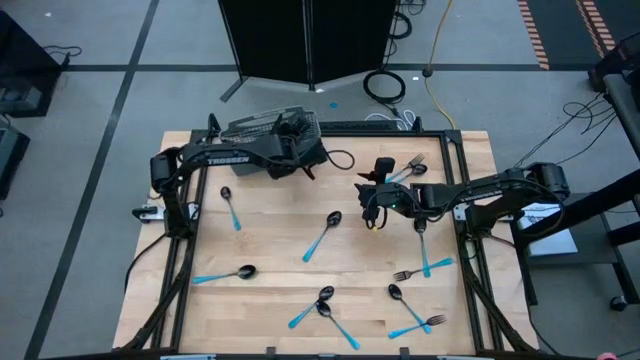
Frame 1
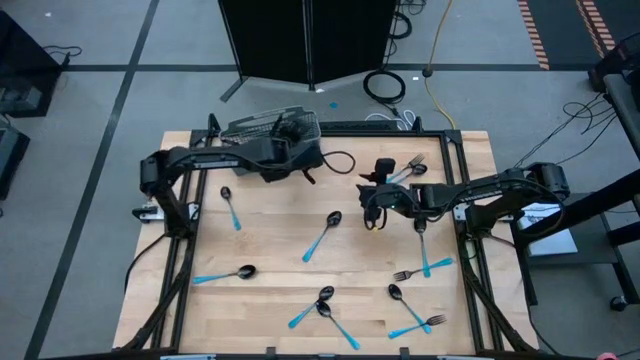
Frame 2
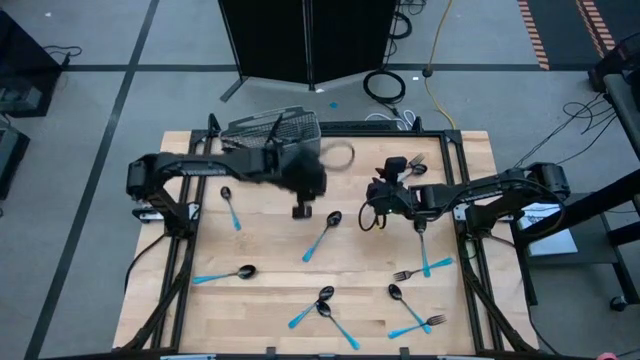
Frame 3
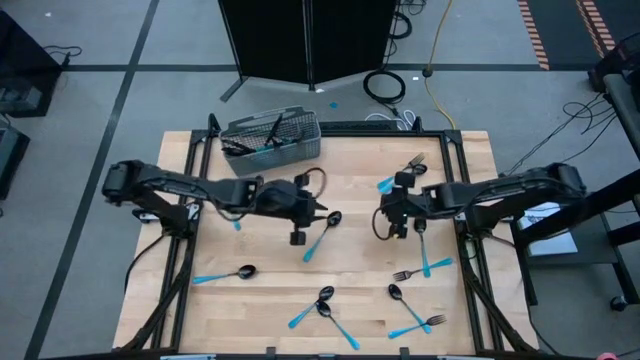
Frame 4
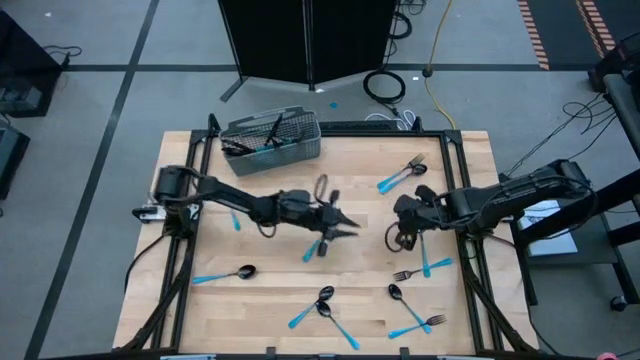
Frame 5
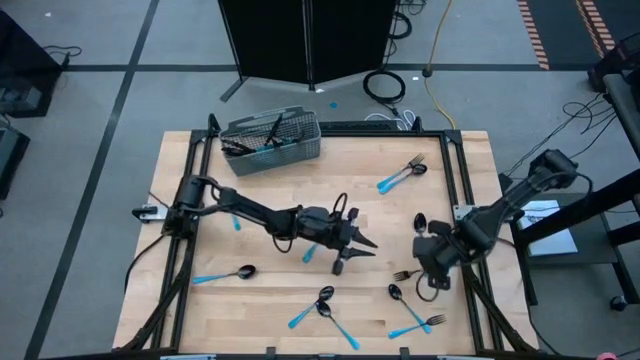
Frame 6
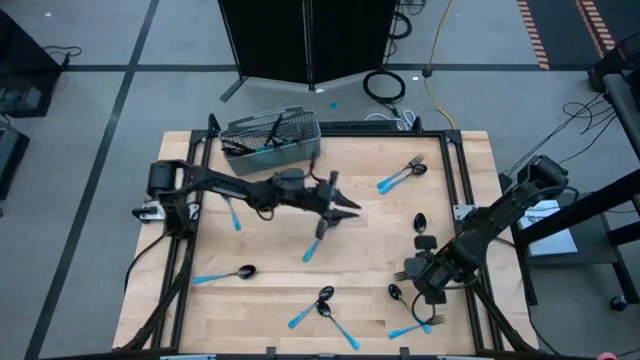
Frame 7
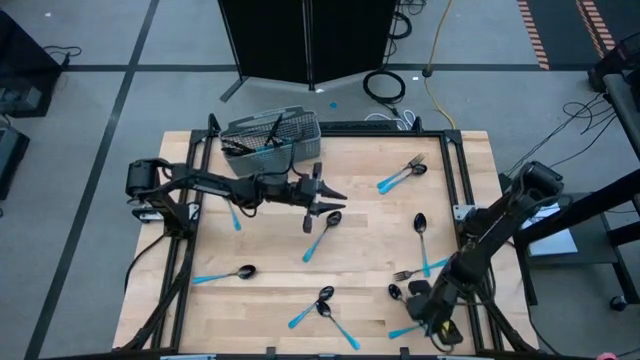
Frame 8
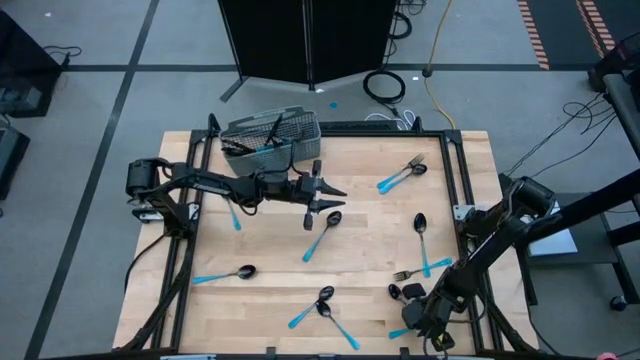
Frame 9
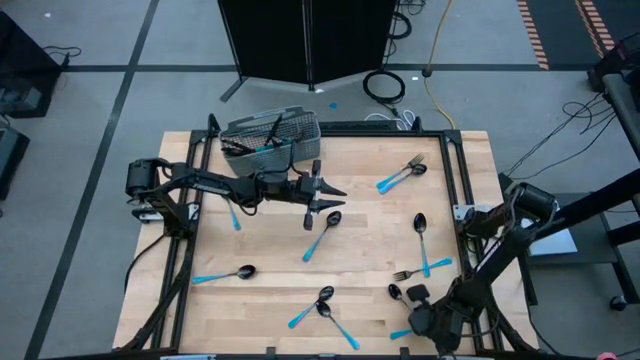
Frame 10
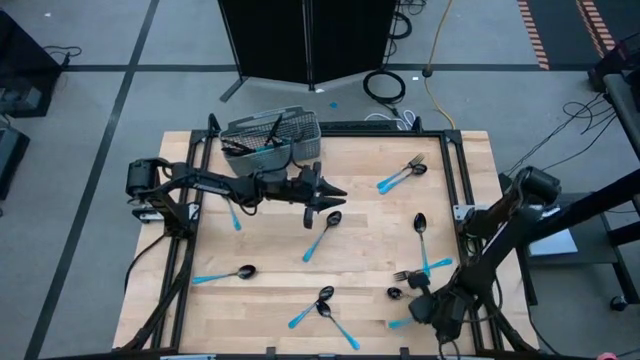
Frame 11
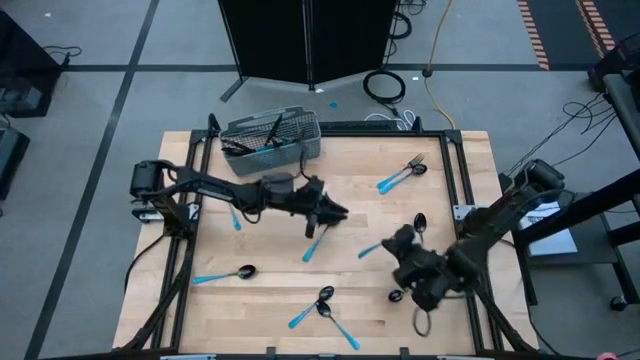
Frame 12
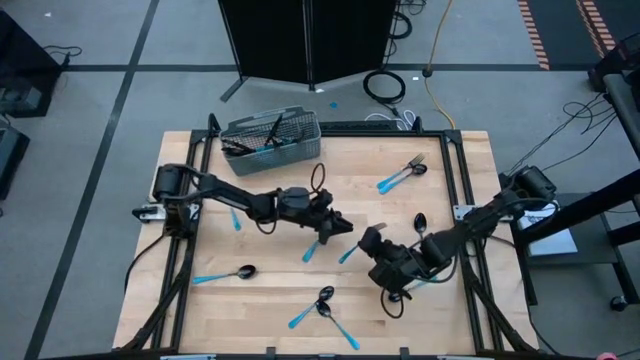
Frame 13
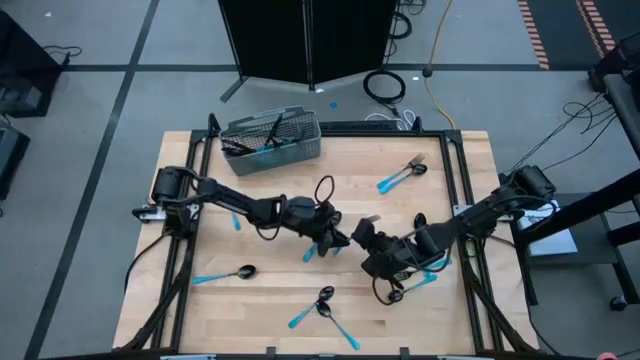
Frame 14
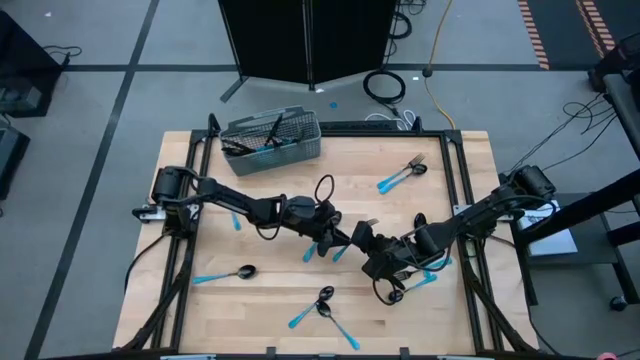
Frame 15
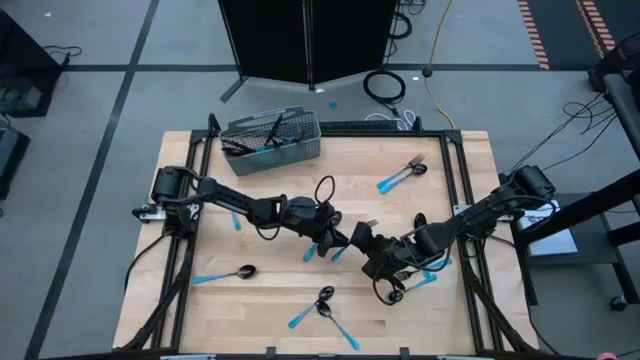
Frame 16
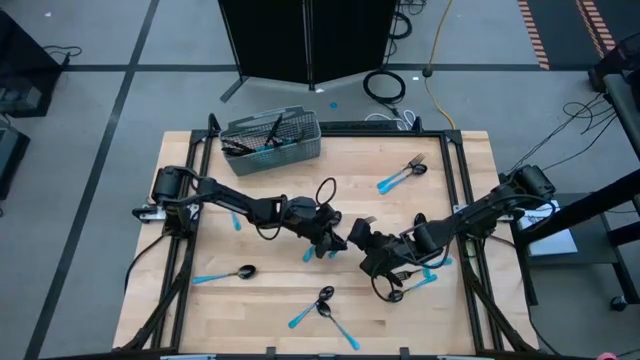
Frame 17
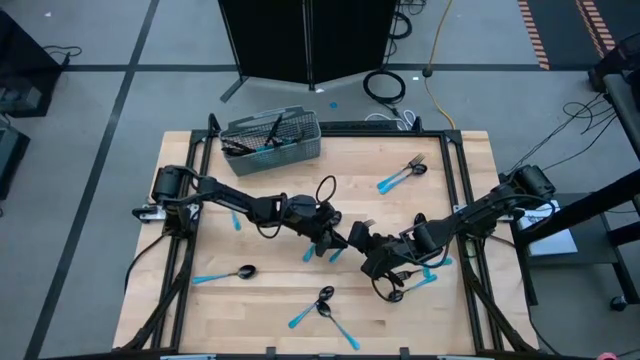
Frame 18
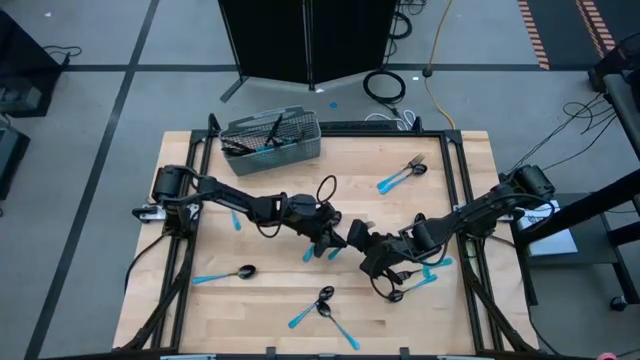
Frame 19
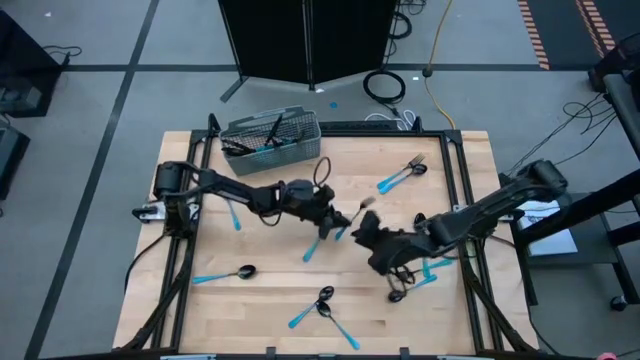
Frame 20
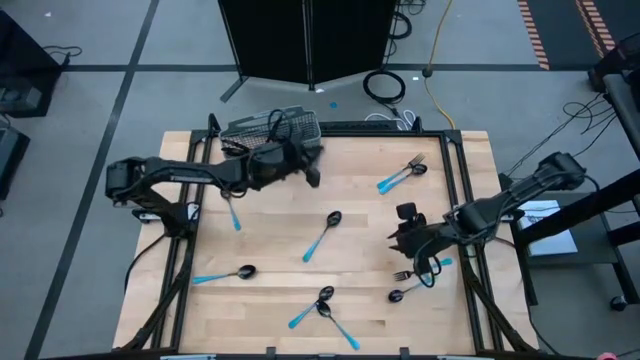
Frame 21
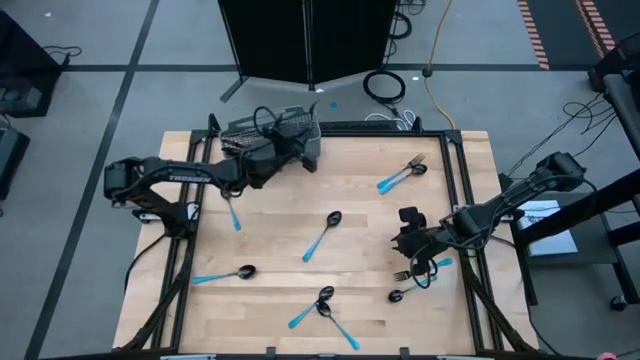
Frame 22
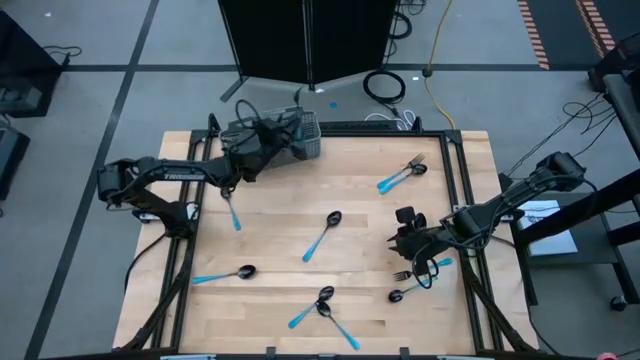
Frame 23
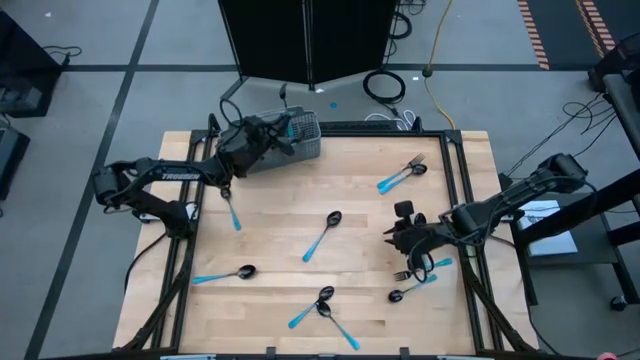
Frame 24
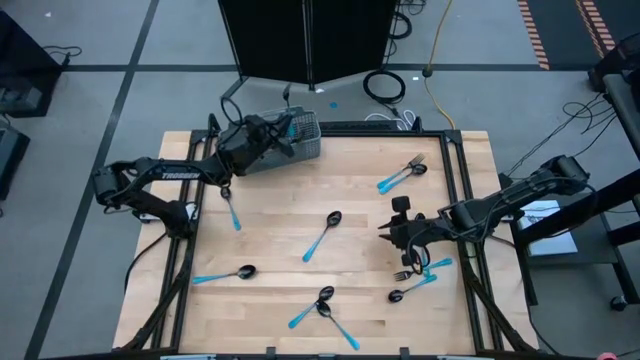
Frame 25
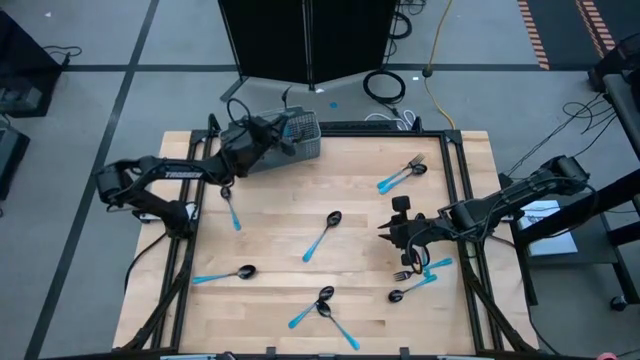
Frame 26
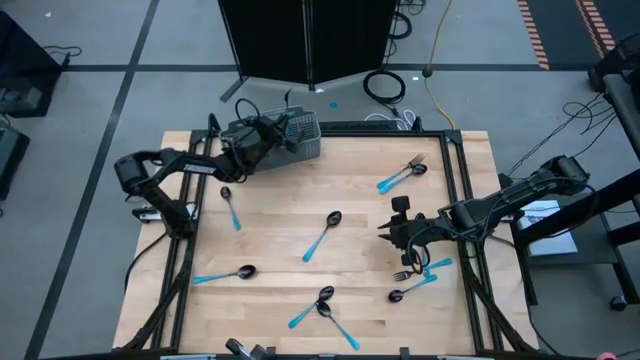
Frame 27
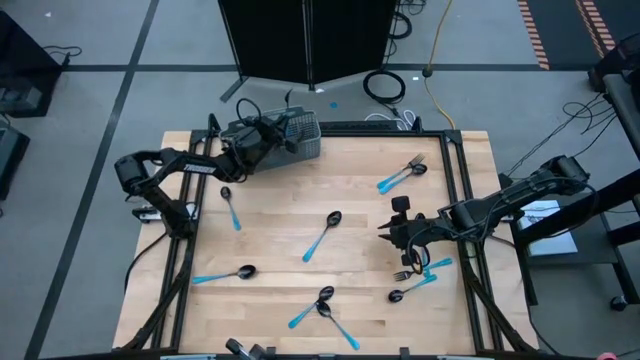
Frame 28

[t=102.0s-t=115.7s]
Task: Sort silverware
Put the blue fork into the silverware basket

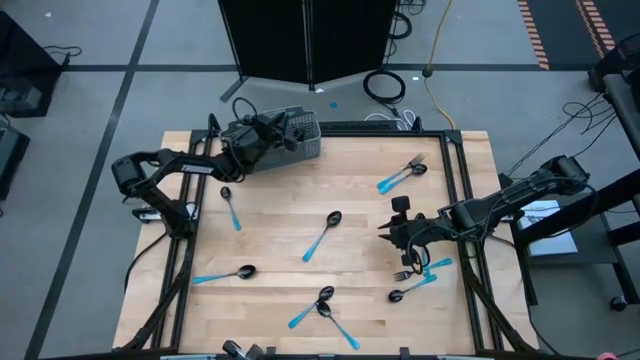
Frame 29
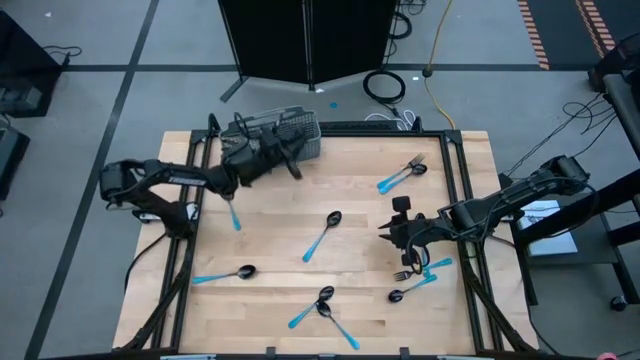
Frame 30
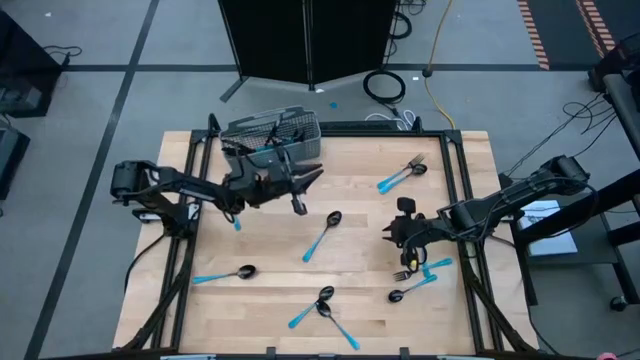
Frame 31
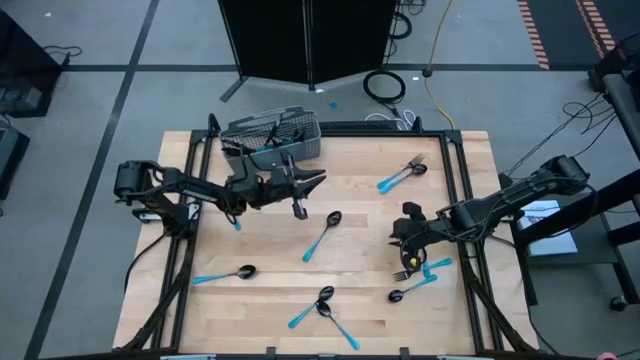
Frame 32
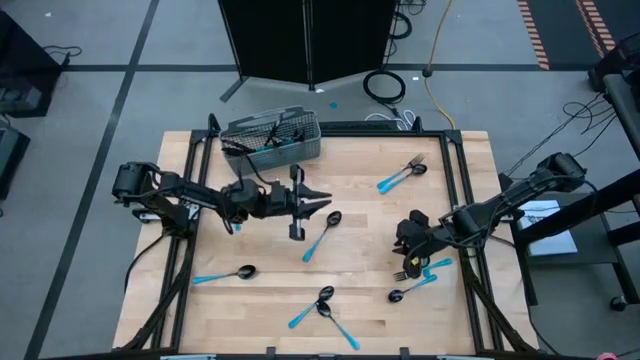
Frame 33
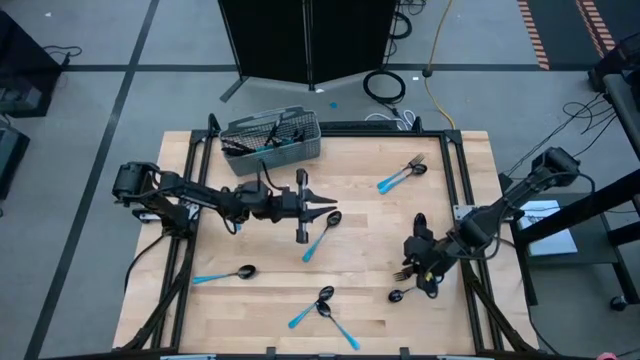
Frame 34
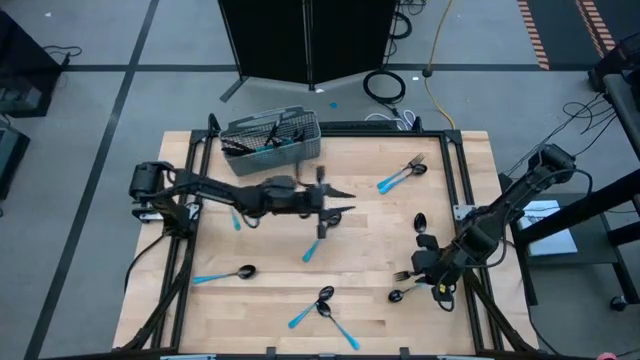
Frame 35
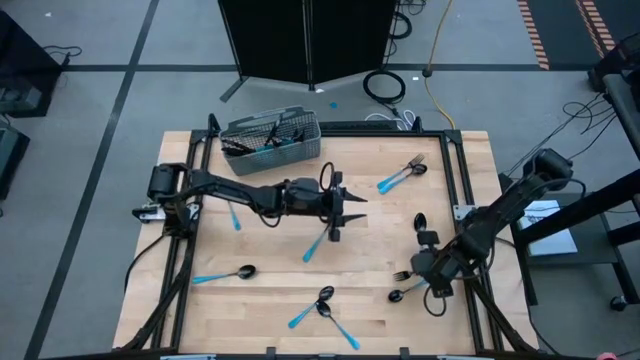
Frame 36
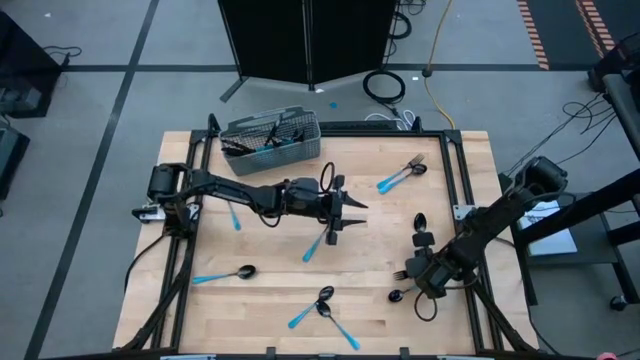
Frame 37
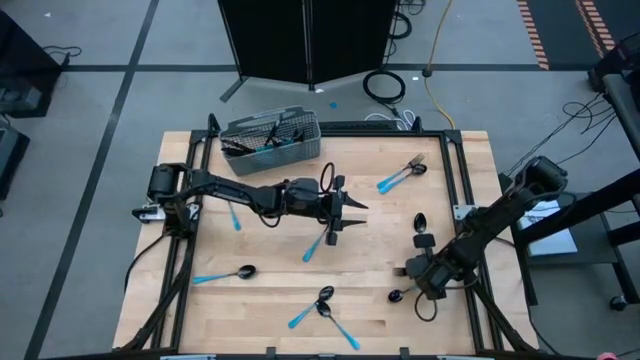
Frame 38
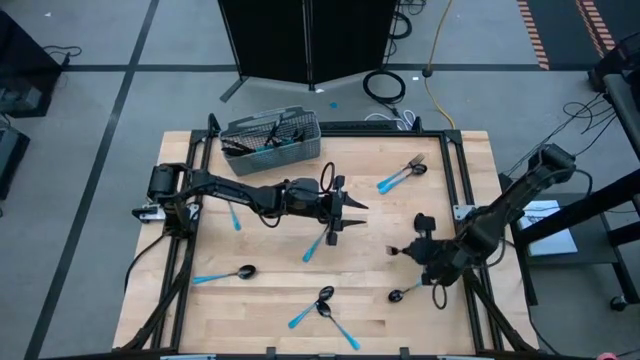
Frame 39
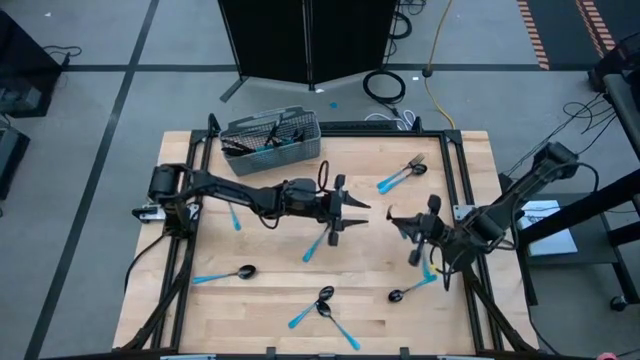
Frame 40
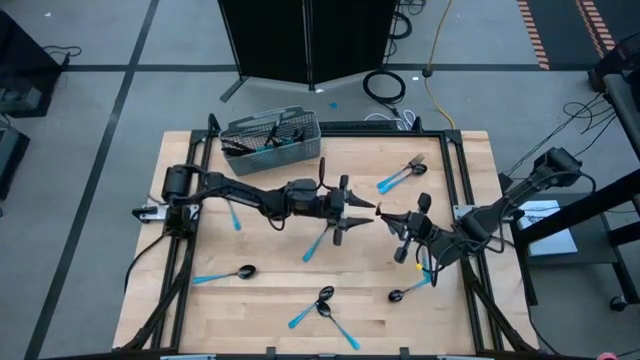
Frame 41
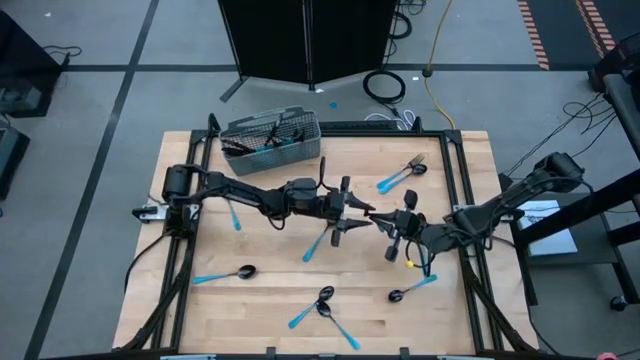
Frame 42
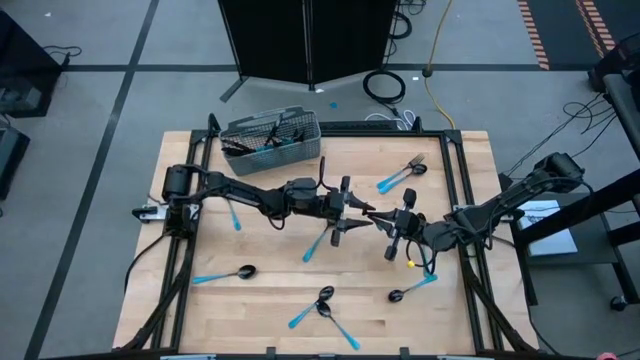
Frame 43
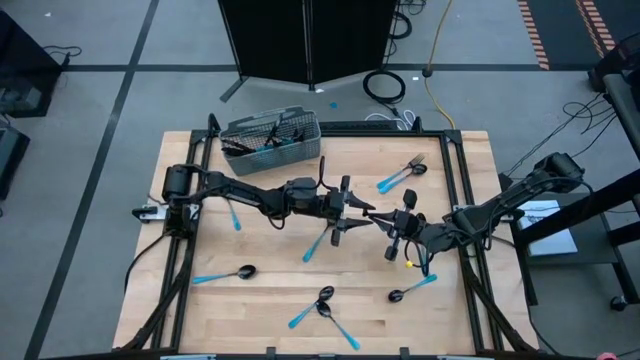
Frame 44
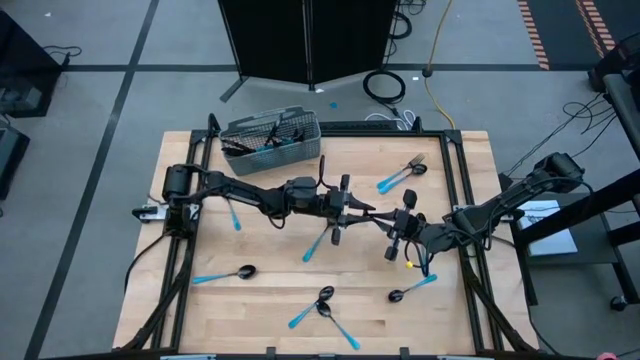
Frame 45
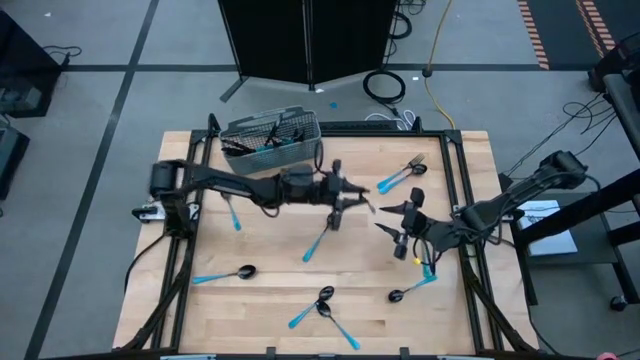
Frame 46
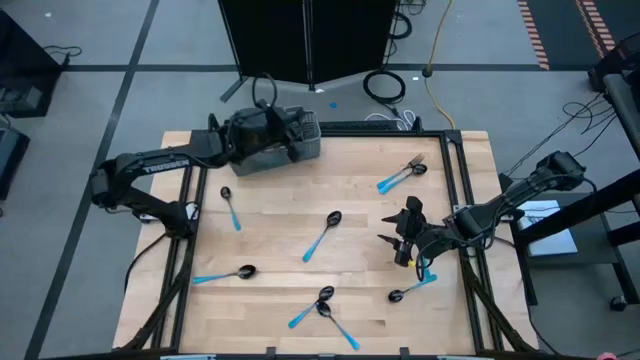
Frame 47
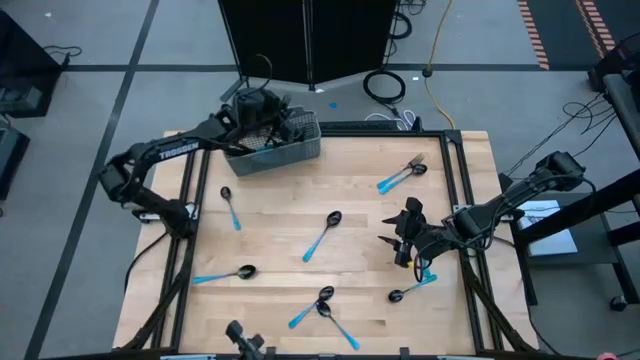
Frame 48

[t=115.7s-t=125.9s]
Put the blue fork into the silverware basket
